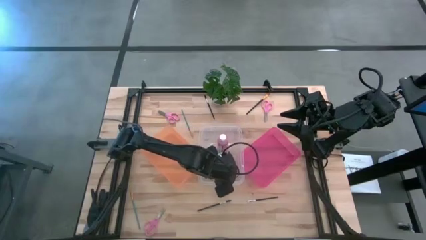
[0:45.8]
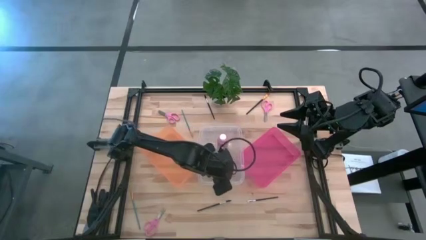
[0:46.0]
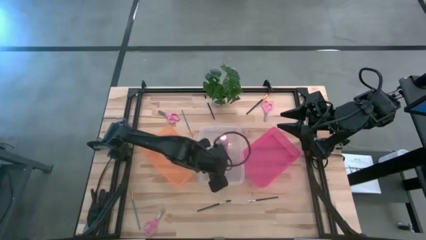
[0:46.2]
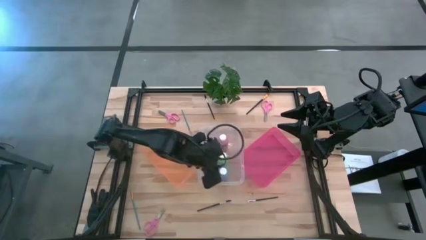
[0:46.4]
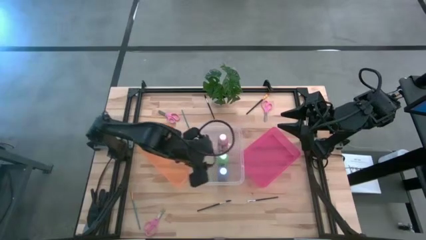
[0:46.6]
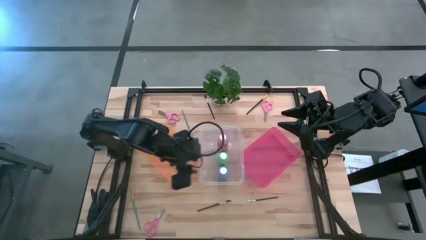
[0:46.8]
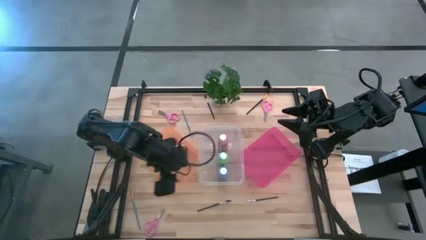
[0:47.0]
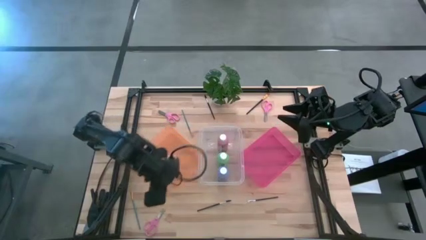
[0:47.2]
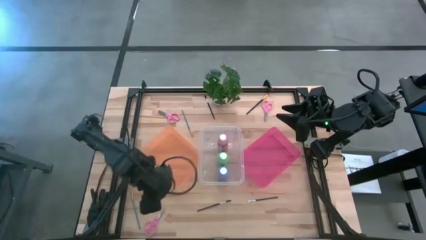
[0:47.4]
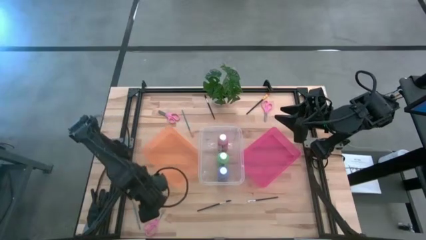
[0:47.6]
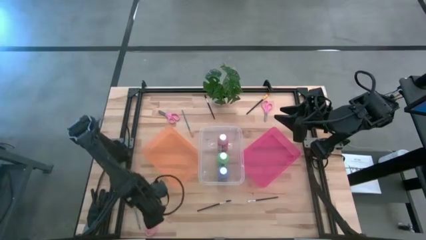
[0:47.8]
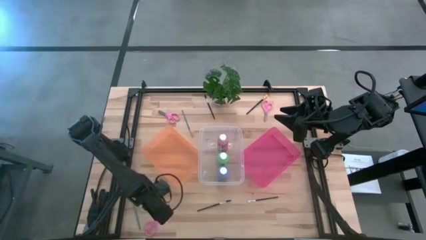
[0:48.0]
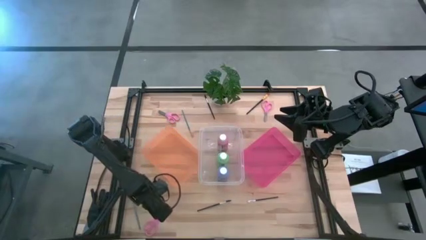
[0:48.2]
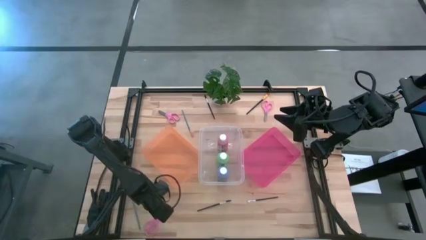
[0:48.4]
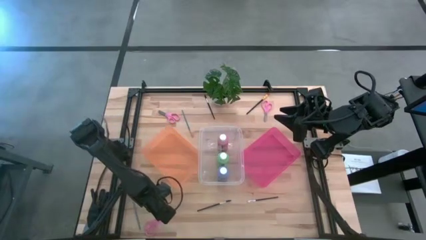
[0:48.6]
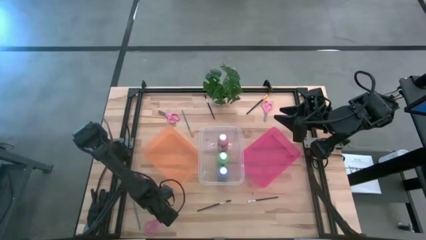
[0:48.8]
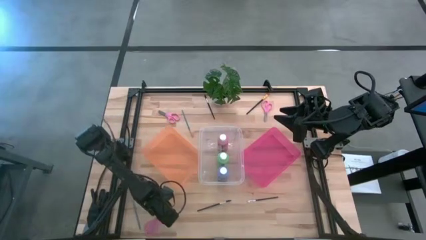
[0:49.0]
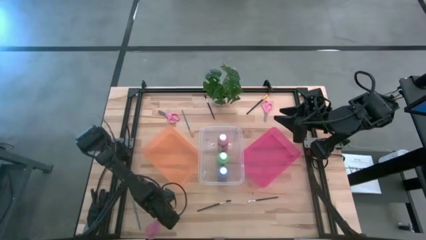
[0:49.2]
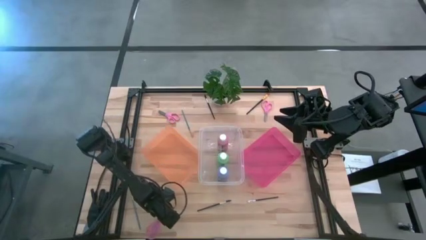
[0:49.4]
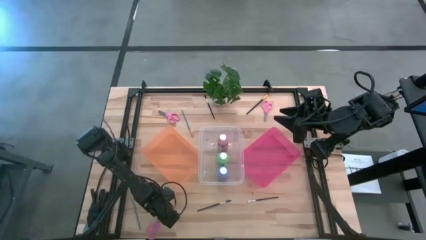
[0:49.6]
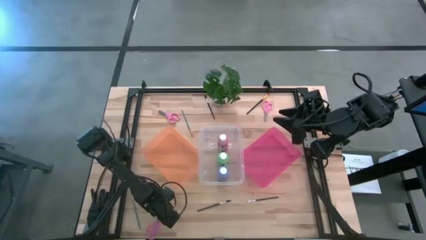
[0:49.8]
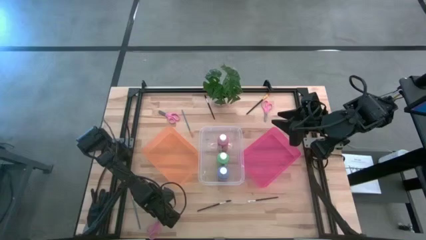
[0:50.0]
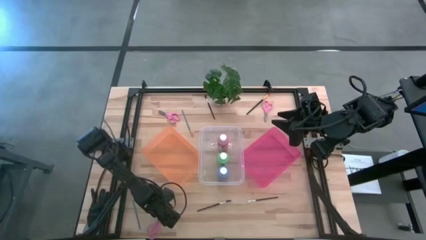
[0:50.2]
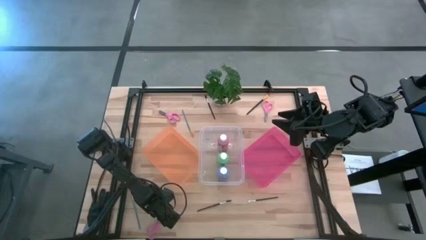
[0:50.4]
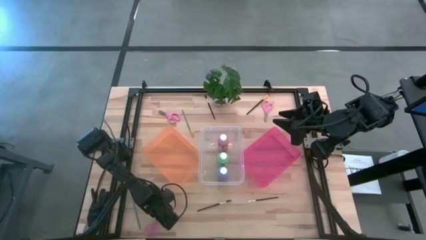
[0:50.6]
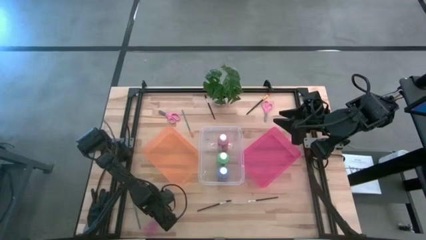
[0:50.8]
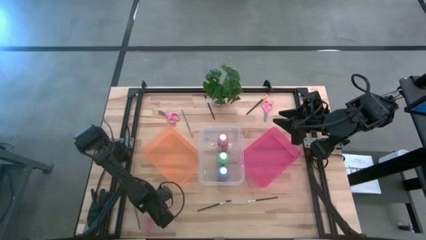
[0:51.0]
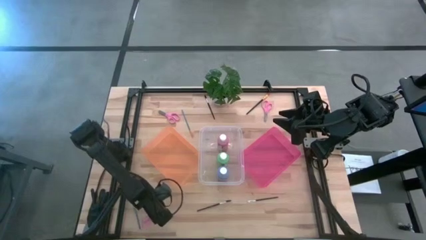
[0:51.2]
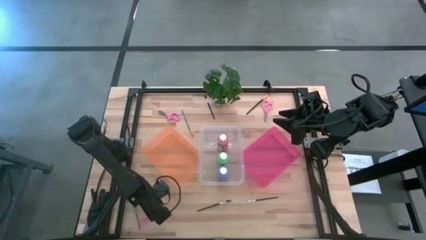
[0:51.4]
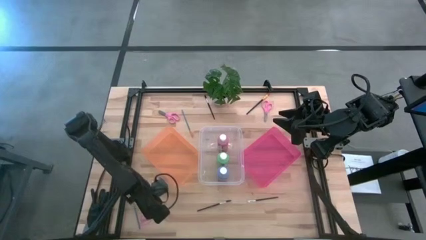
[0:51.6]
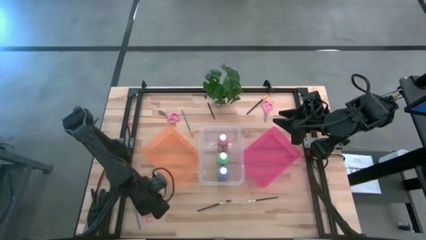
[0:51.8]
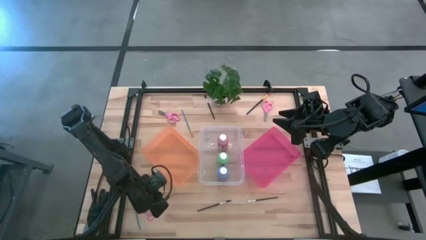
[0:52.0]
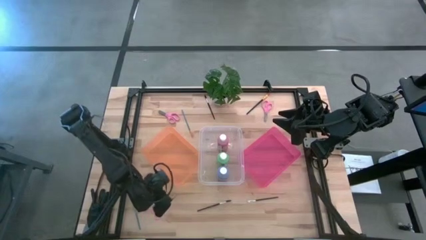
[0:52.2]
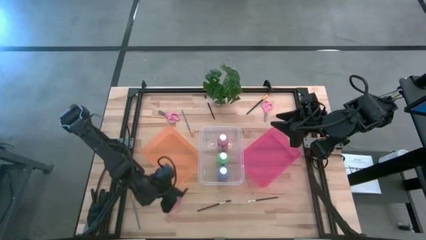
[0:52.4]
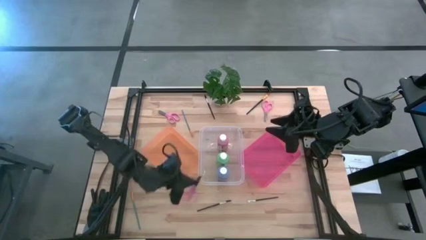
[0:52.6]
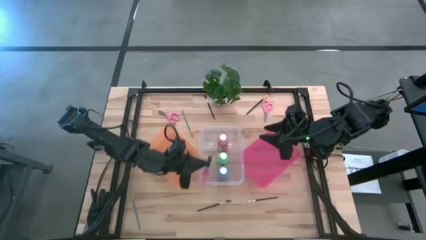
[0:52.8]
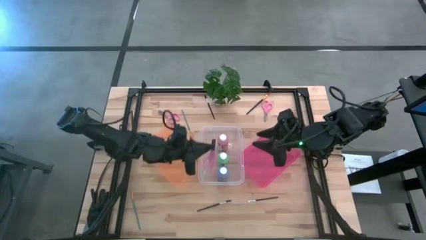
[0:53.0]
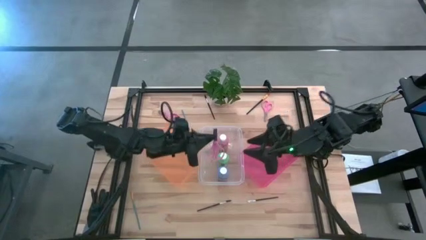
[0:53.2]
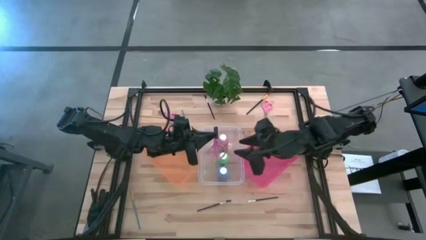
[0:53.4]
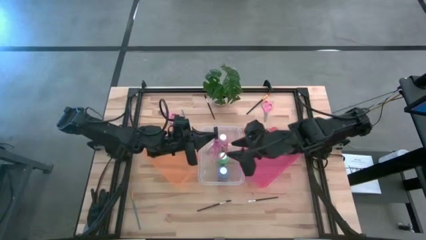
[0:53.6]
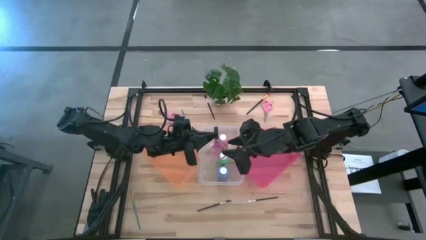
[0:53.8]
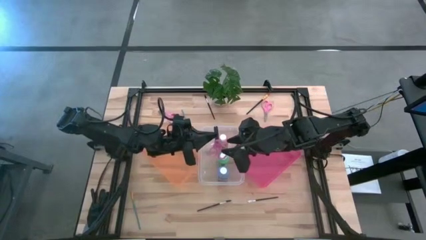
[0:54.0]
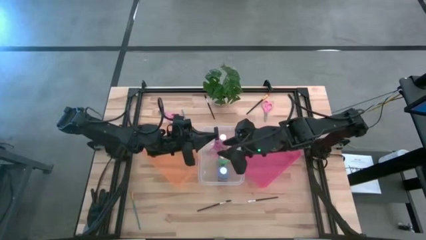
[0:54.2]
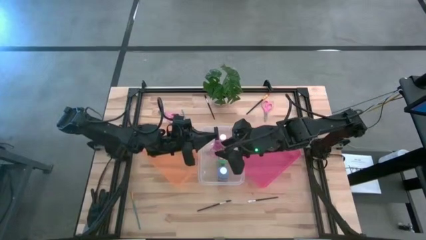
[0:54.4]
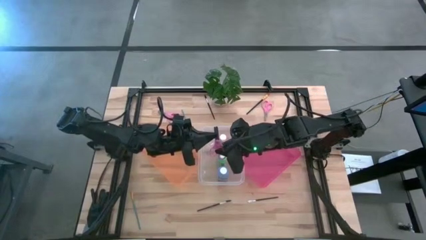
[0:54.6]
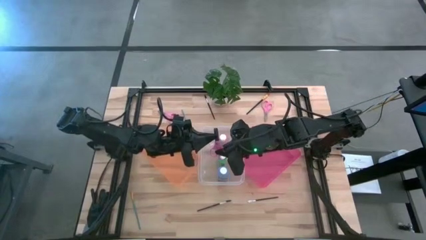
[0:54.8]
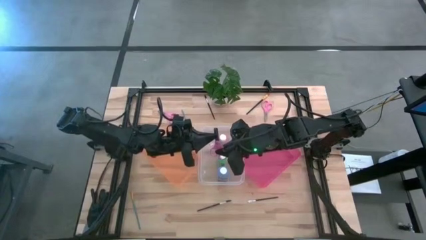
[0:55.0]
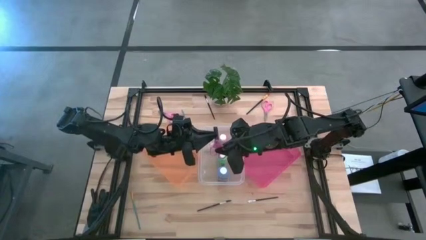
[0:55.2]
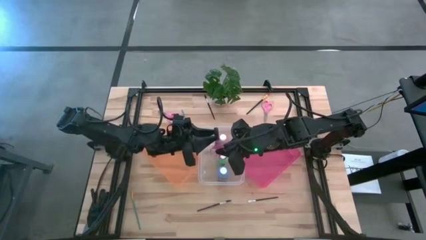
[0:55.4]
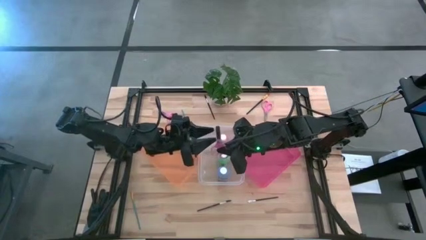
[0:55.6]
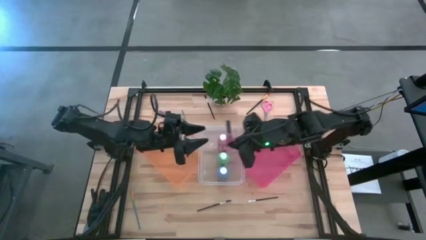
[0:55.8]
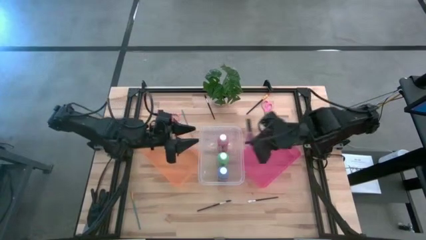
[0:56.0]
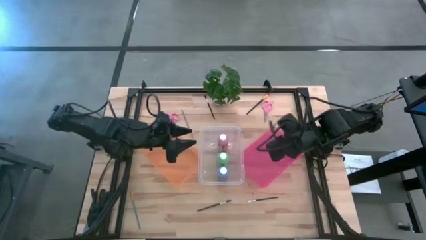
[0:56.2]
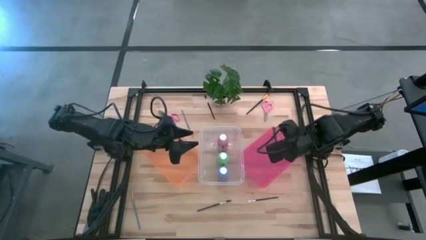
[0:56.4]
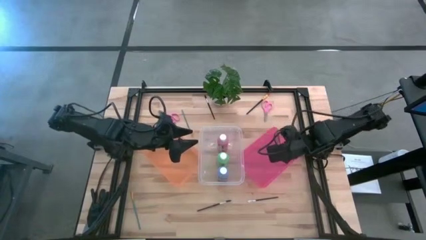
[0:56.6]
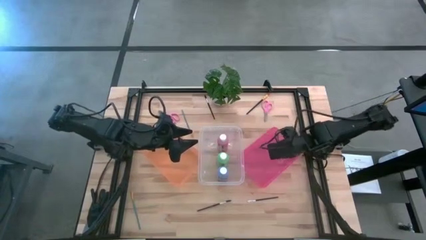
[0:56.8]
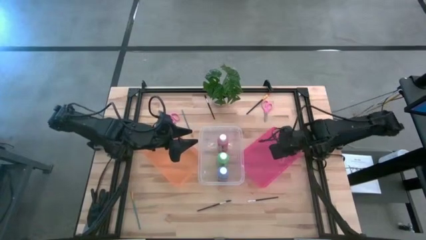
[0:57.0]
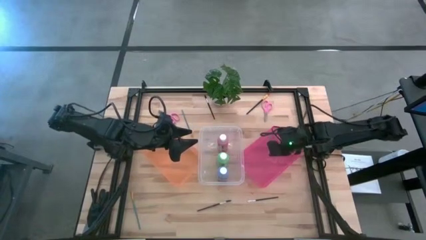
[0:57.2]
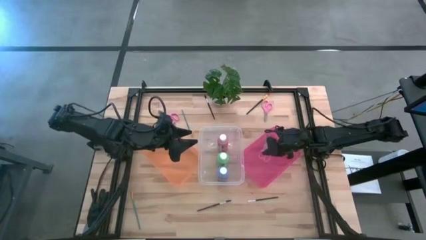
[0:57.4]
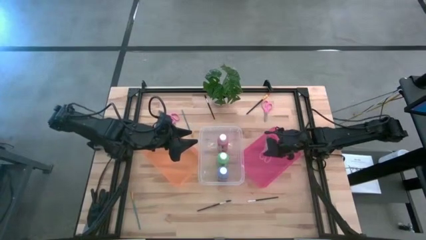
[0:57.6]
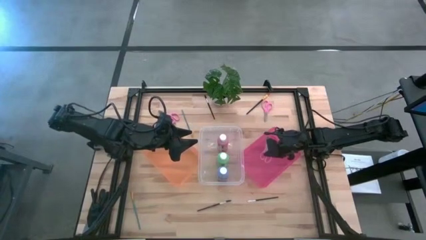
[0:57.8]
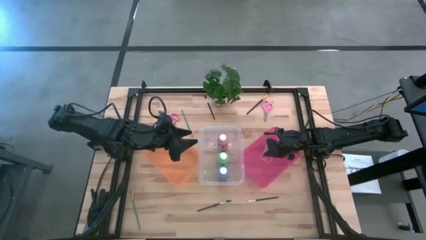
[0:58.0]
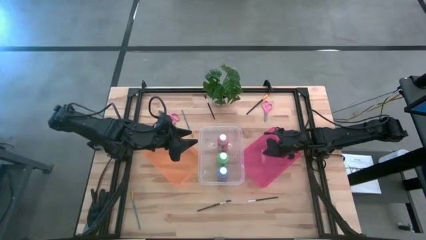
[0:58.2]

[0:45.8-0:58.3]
Task: Pick & Place Paint Supplies
Put the bottom left scissors into the pink bin

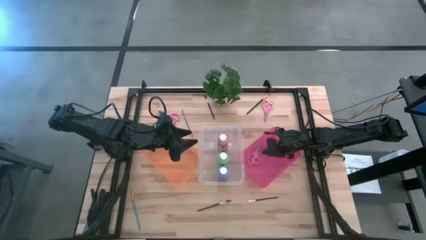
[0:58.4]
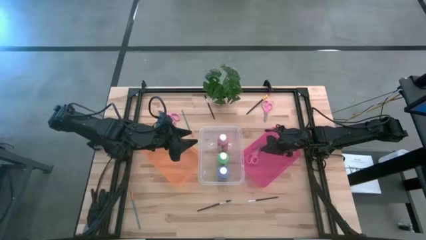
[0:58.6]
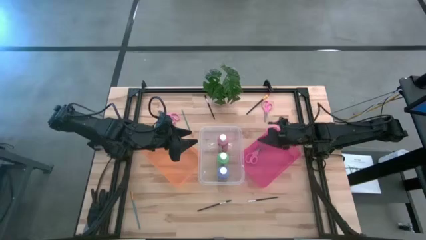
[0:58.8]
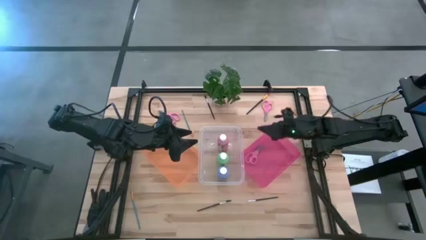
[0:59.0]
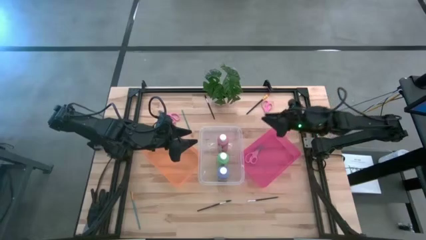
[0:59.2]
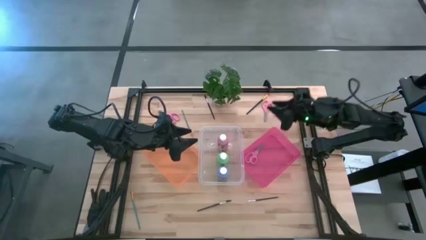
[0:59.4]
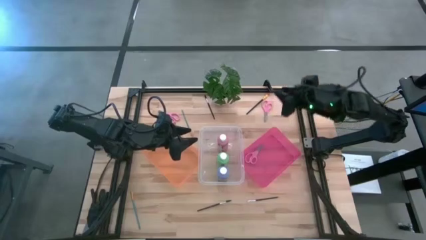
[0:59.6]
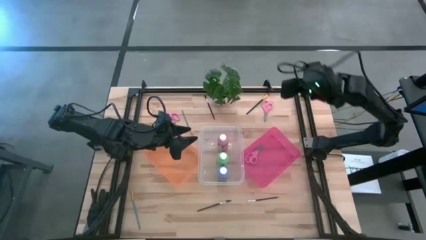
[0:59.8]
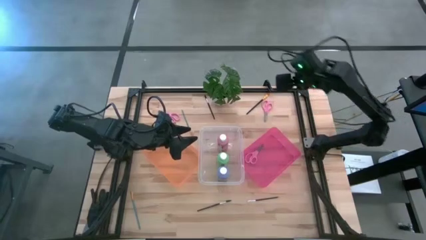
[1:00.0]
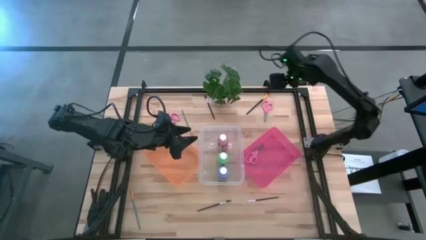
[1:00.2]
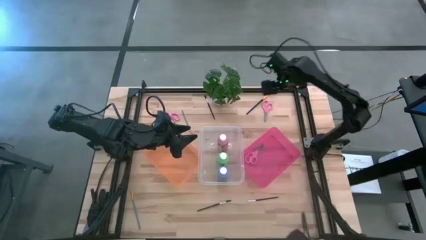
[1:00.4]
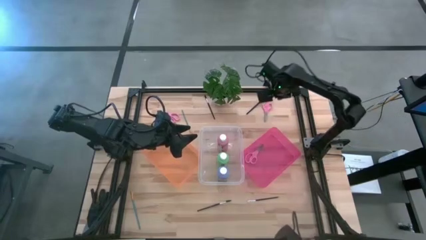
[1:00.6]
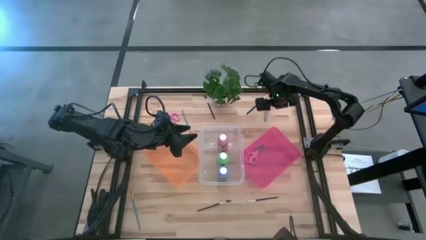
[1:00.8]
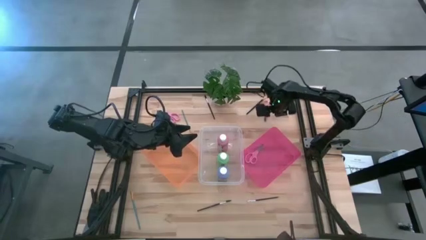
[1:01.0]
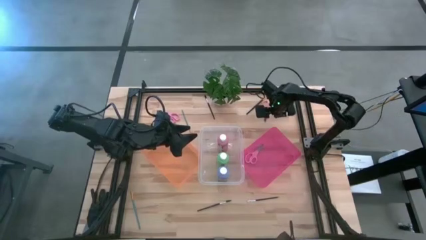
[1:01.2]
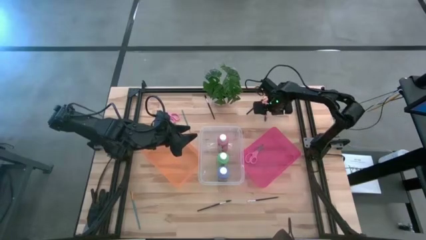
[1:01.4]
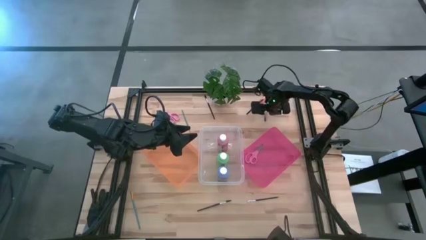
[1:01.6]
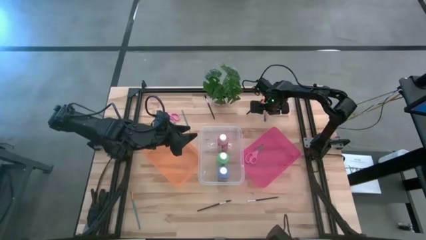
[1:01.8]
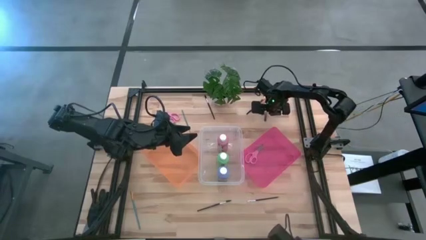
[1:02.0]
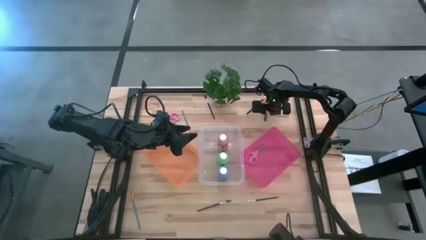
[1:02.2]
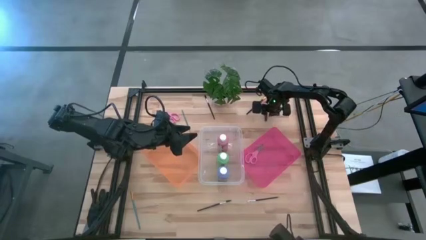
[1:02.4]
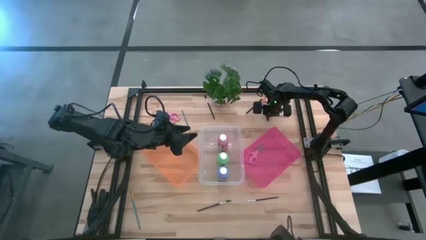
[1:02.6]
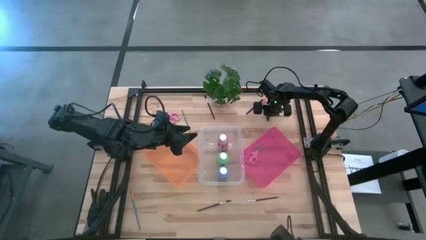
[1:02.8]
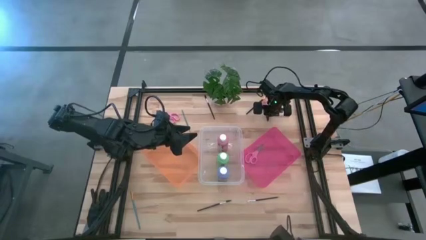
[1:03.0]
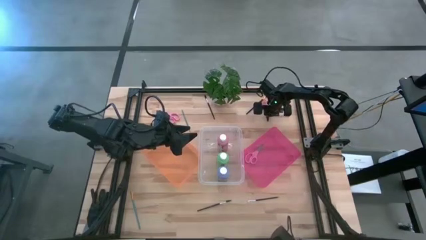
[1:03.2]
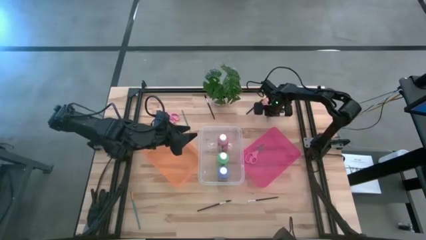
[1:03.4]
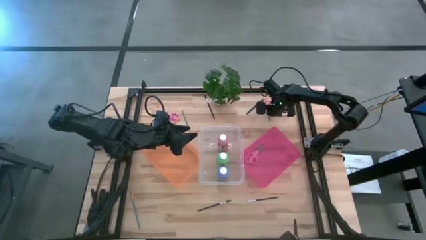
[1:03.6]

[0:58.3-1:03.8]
Put the right scissors into the pink bin
